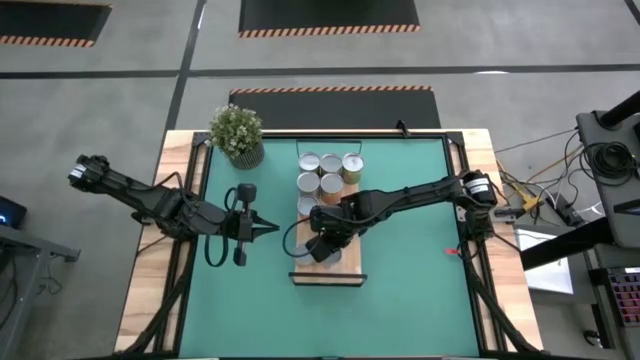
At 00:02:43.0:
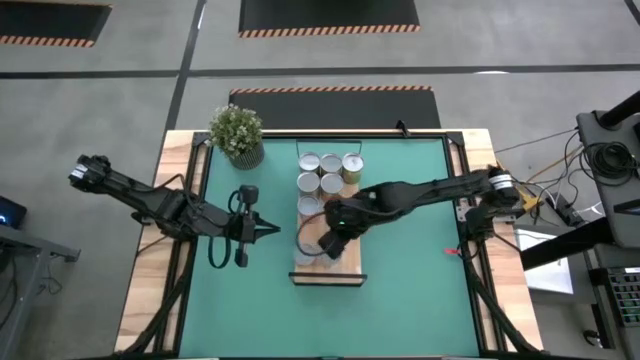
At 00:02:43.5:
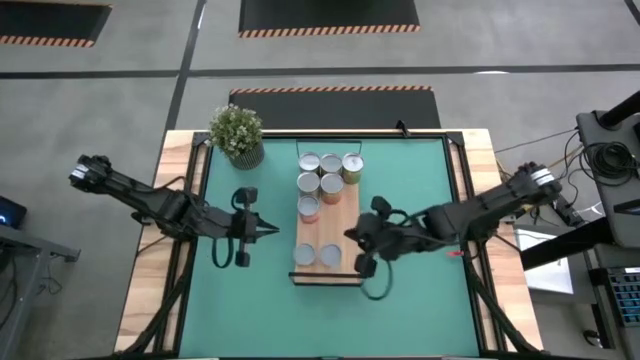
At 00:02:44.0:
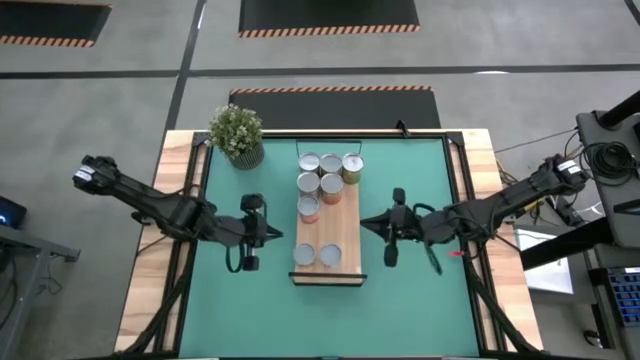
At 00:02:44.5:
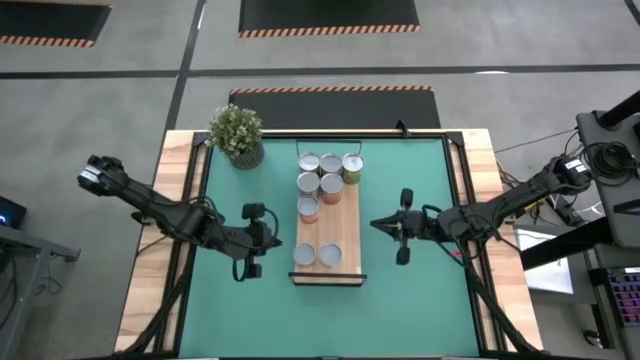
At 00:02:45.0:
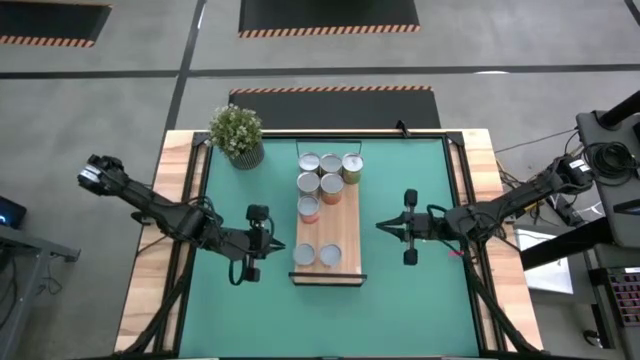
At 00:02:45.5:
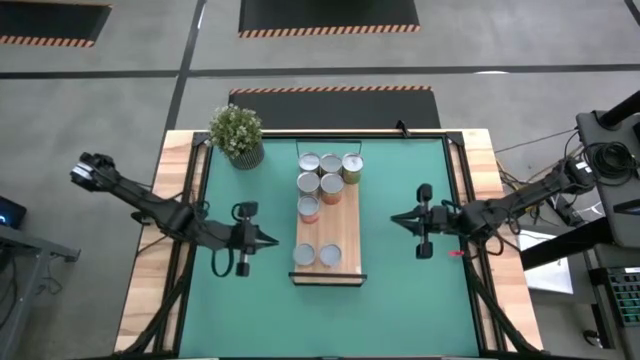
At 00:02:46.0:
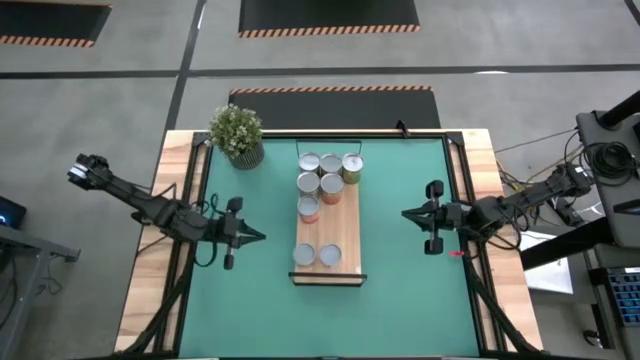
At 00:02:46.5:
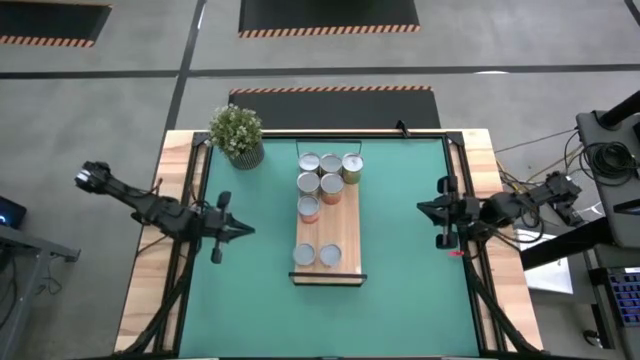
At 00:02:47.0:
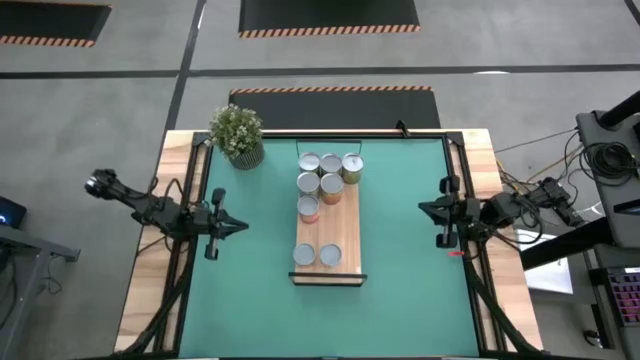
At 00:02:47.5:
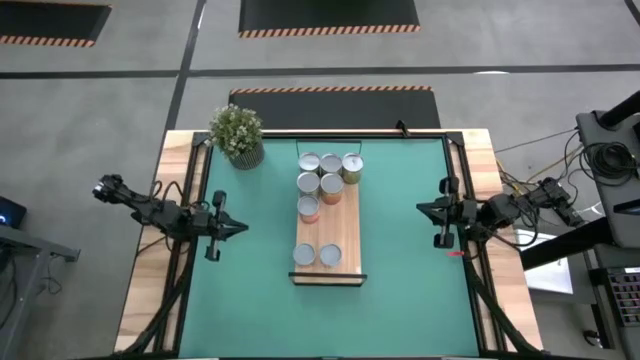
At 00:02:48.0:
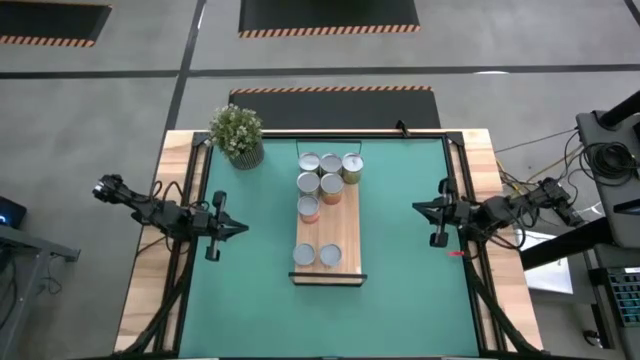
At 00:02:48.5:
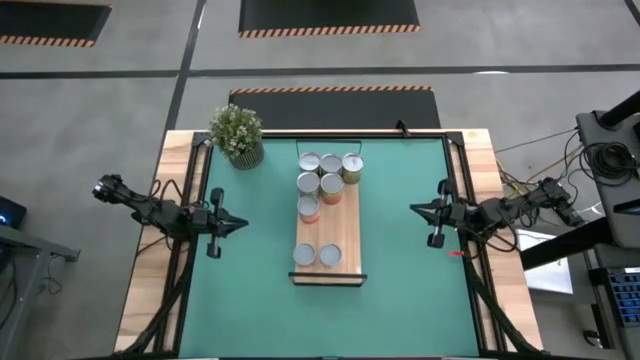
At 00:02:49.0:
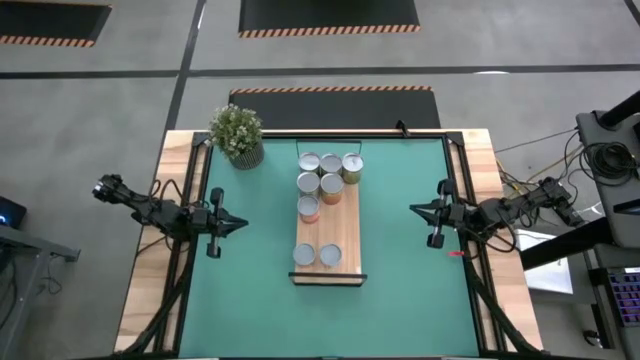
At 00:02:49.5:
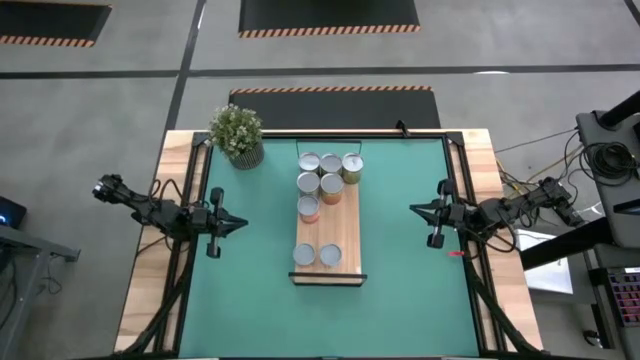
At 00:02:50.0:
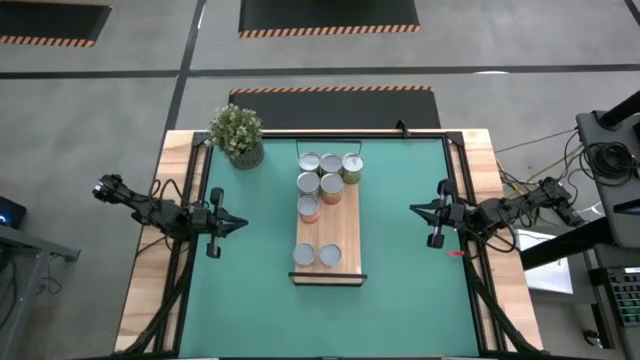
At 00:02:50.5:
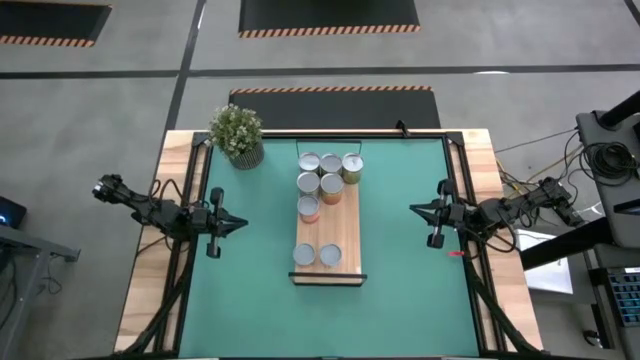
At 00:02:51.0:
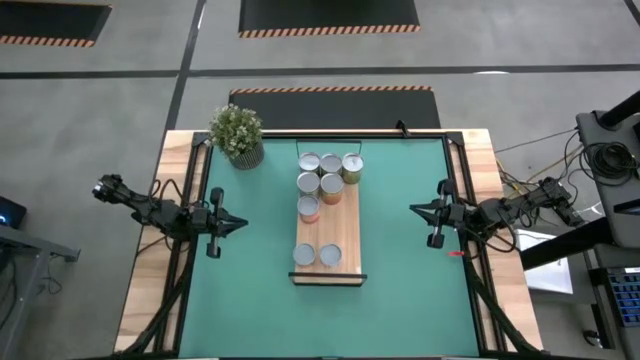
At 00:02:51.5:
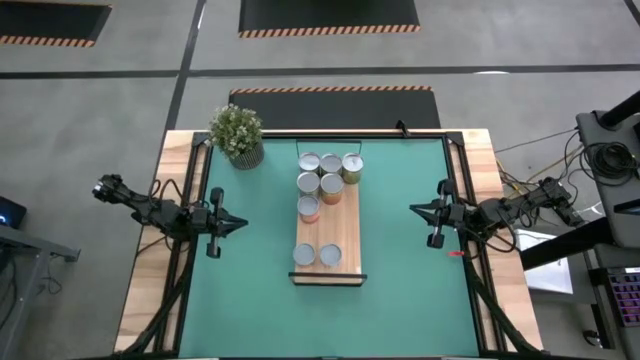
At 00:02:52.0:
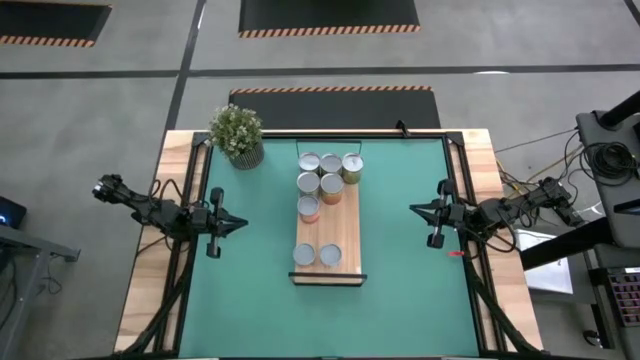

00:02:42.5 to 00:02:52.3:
Task: Pick and place cans onto a shelf
Return to Home Position

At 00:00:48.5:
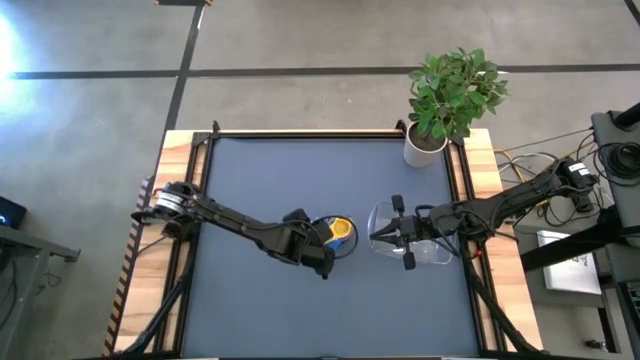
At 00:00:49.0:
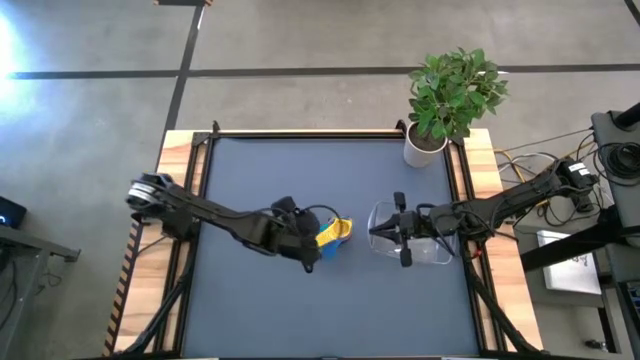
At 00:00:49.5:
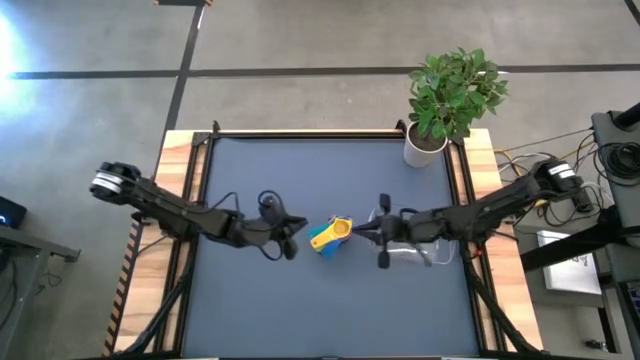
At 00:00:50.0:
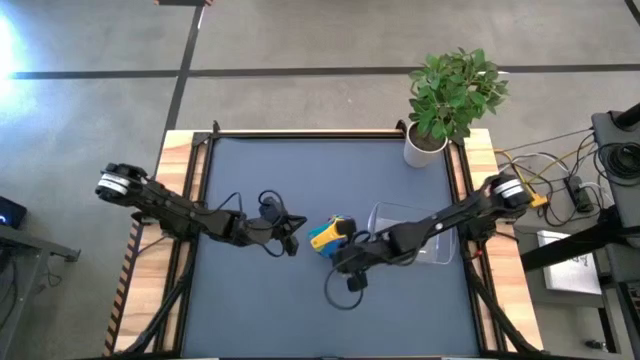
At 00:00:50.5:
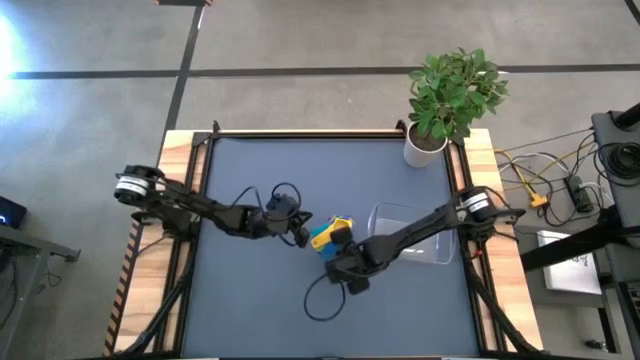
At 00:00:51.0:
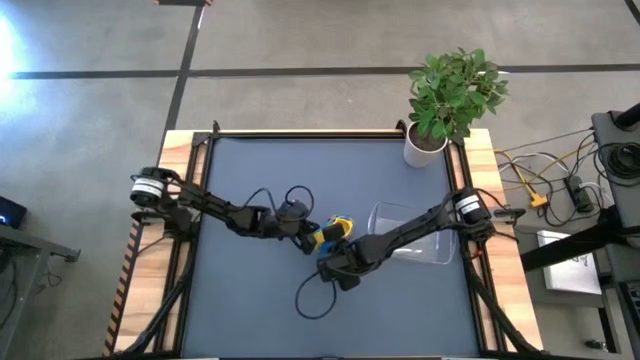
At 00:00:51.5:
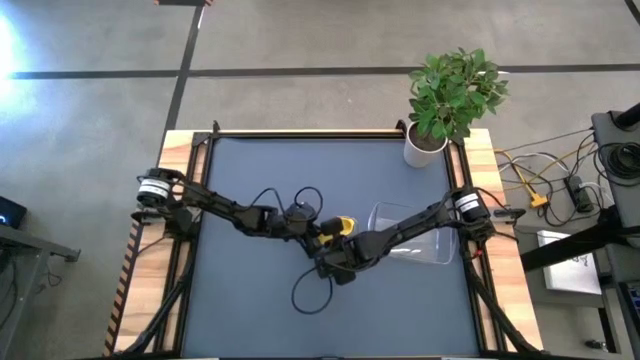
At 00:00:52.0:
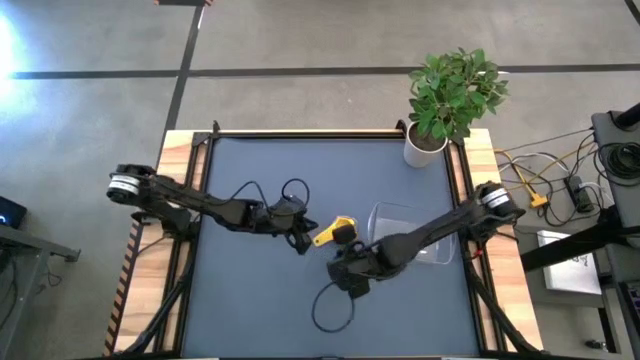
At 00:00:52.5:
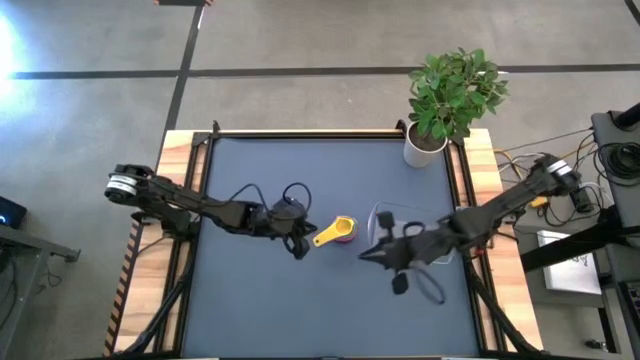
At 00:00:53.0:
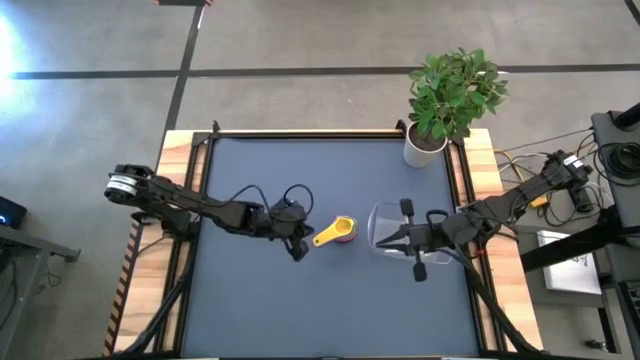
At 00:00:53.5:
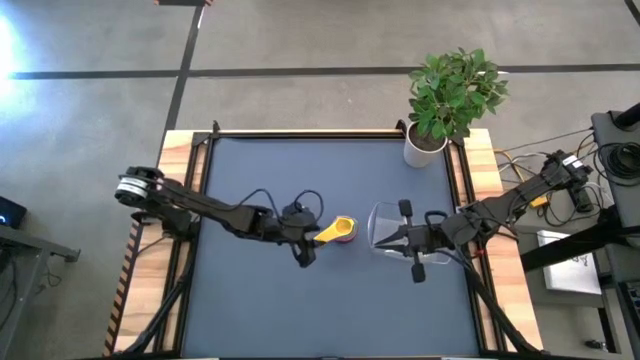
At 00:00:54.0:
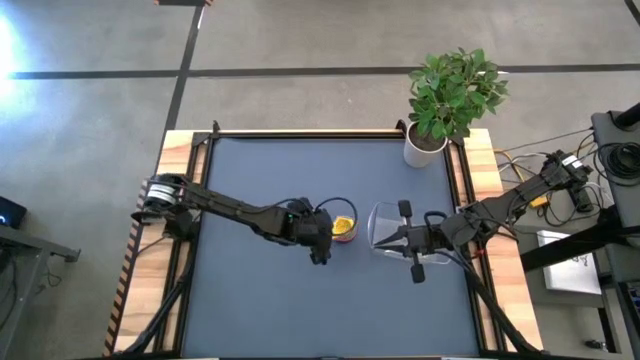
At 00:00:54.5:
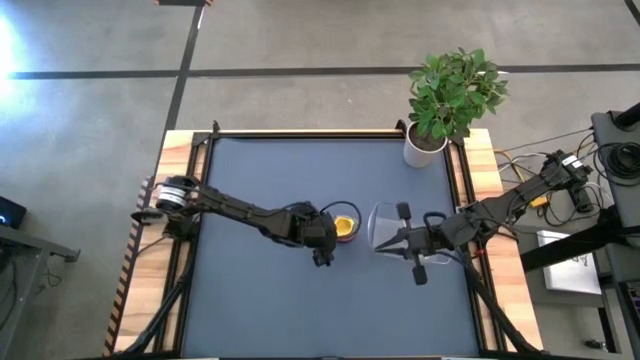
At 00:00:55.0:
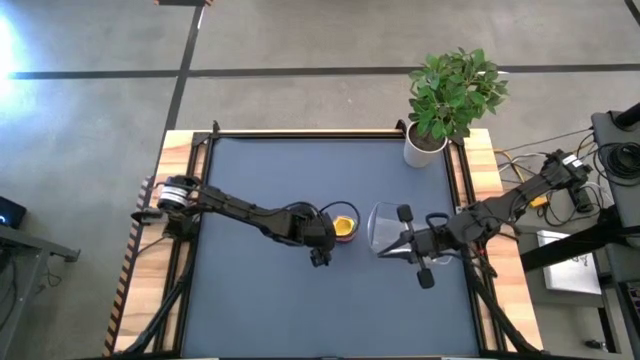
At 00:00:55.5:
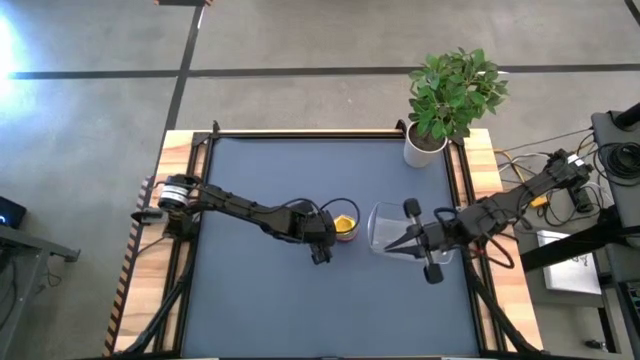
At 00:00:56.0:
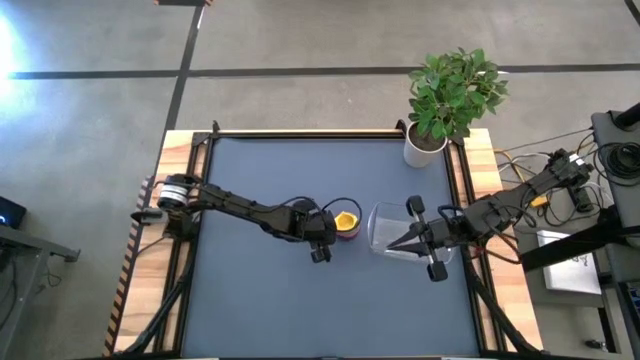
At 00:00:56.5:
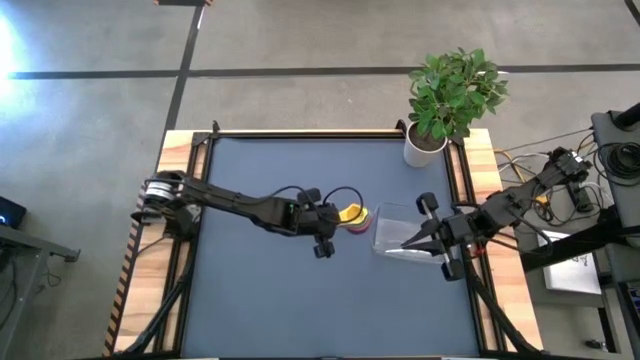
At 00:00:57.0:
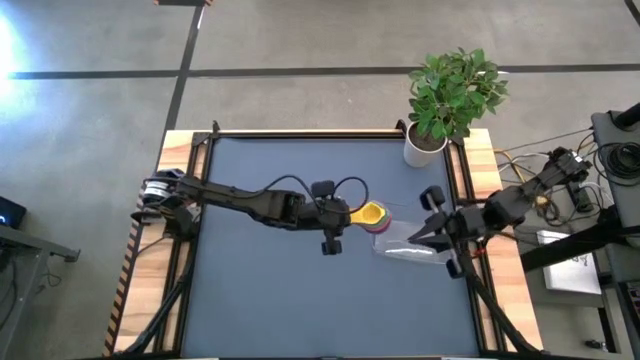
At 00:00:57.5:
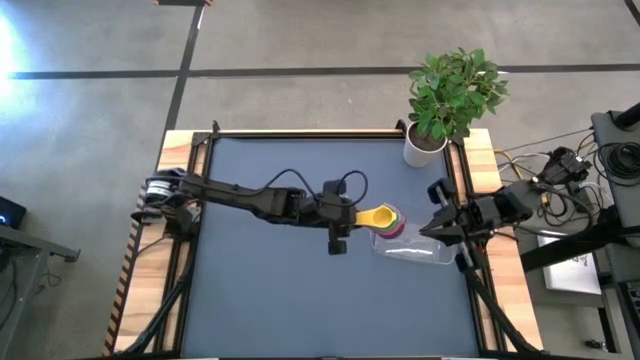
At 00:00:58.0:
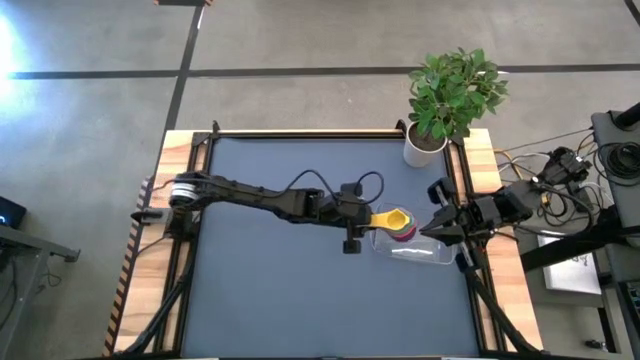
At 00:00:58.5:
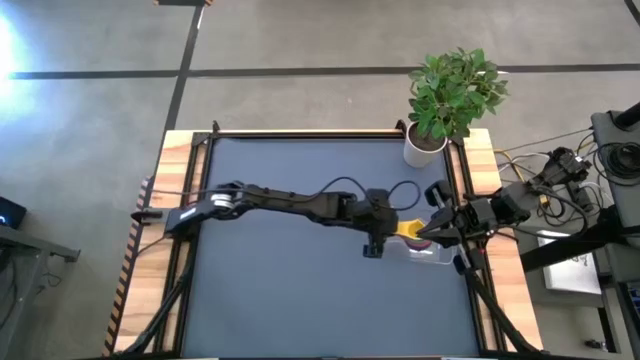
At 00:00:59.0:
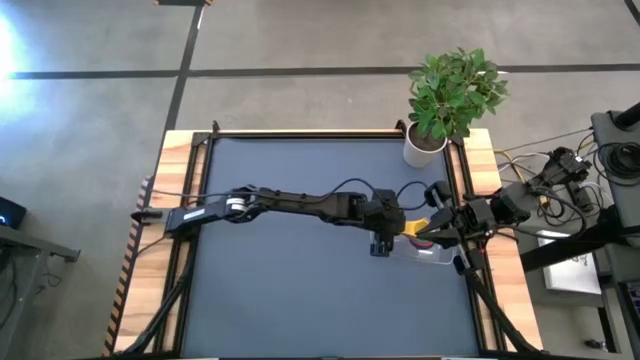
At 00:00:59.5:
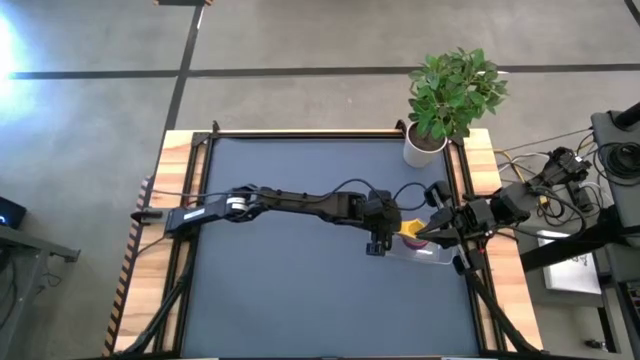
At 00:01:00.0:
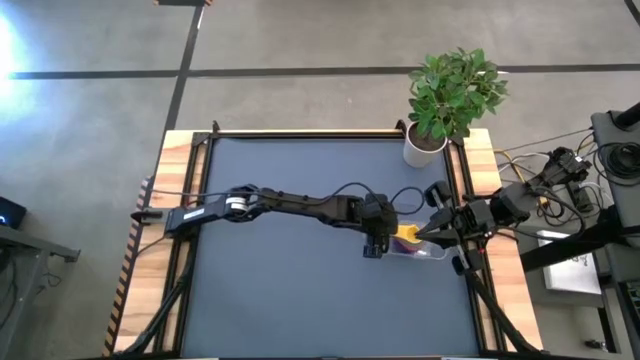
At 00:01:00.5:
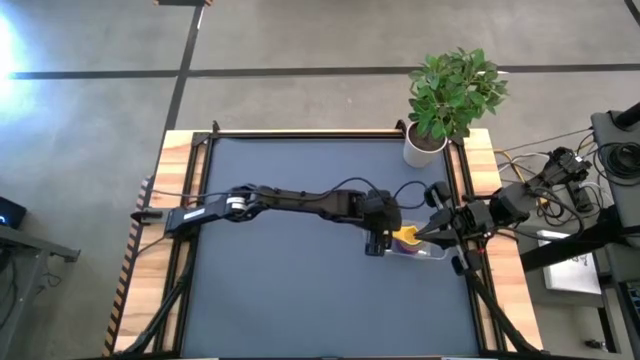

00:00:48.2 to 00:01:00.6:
Task: Nest measuring cups in basket
Put the nested measuring cups into the transparent bin
